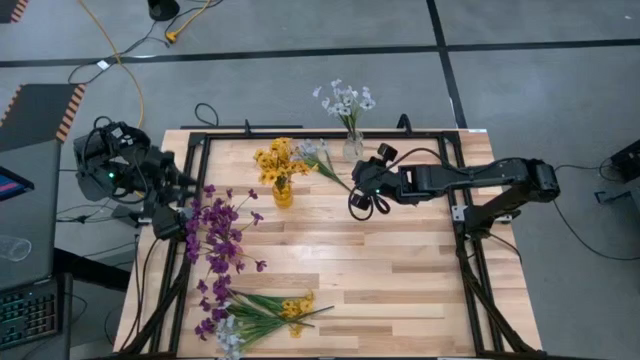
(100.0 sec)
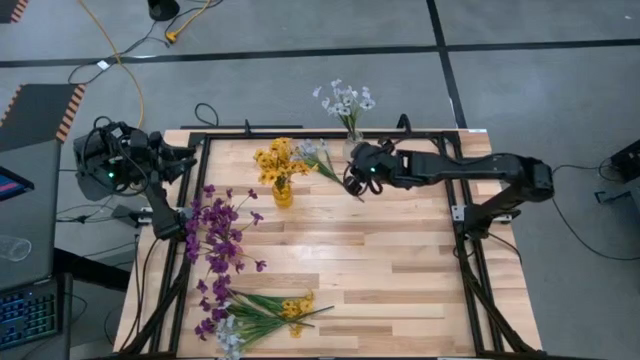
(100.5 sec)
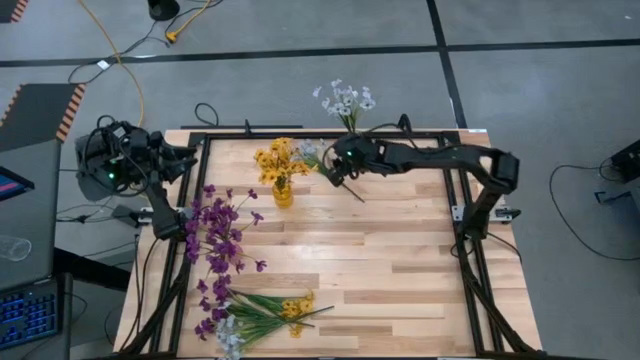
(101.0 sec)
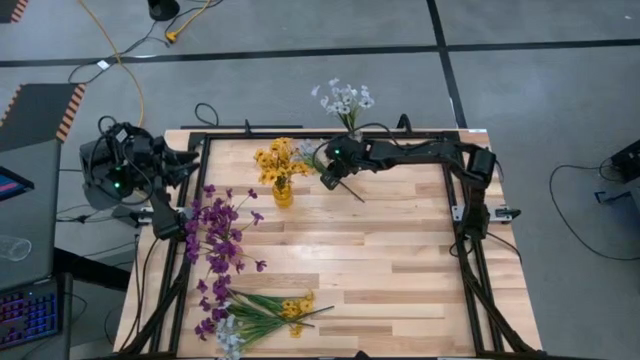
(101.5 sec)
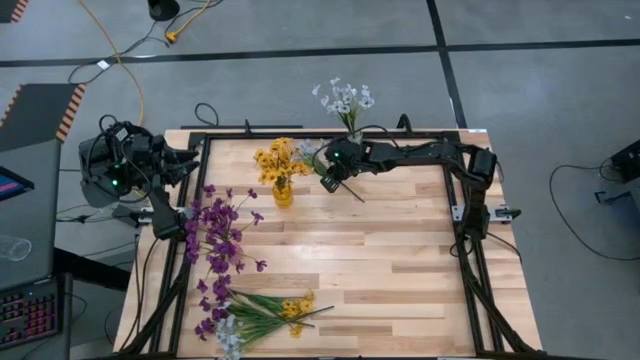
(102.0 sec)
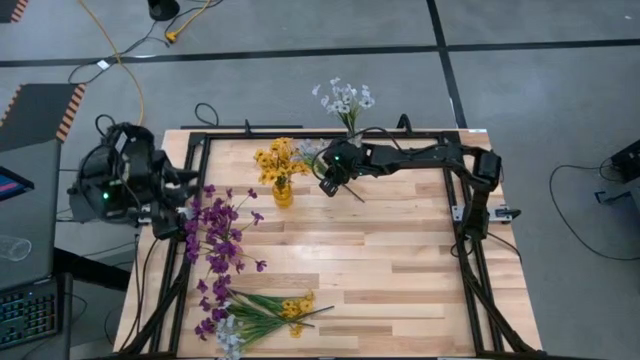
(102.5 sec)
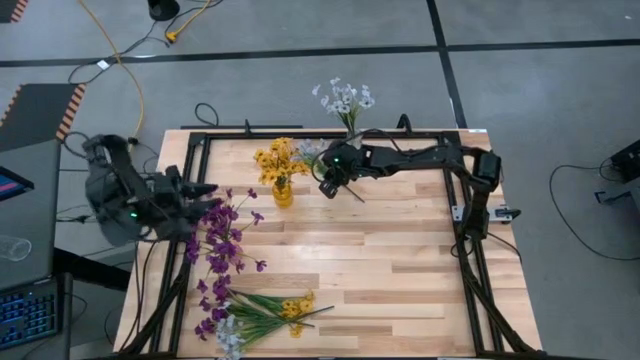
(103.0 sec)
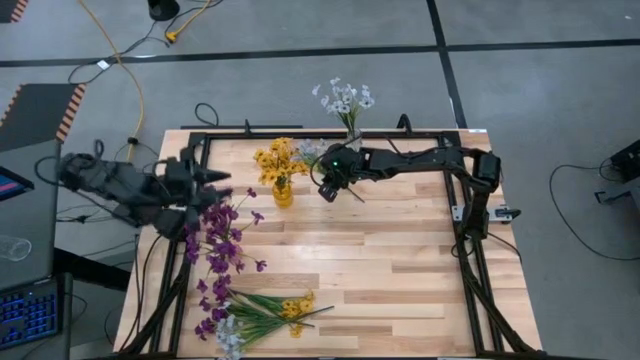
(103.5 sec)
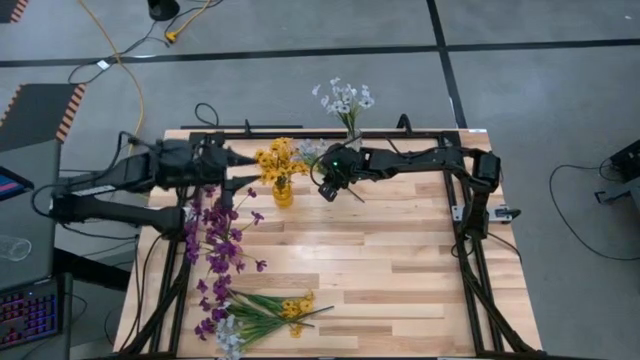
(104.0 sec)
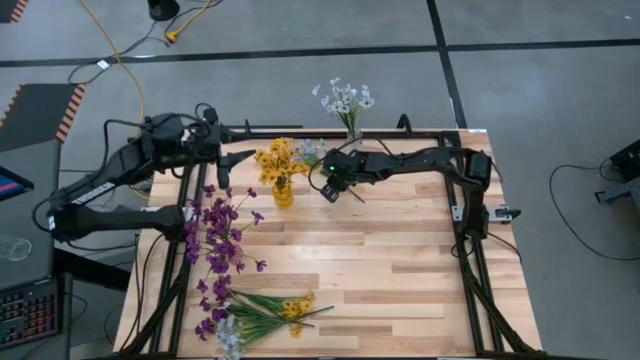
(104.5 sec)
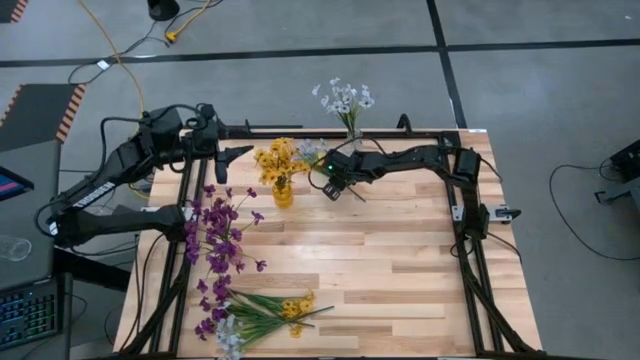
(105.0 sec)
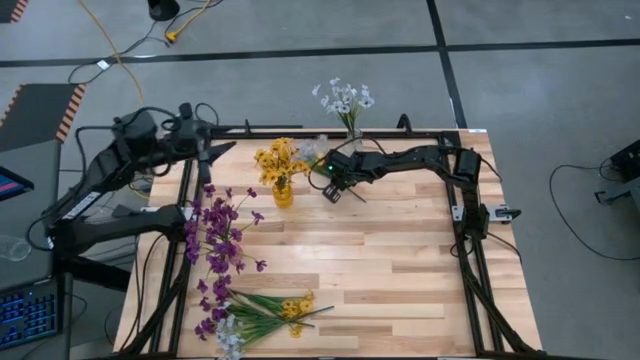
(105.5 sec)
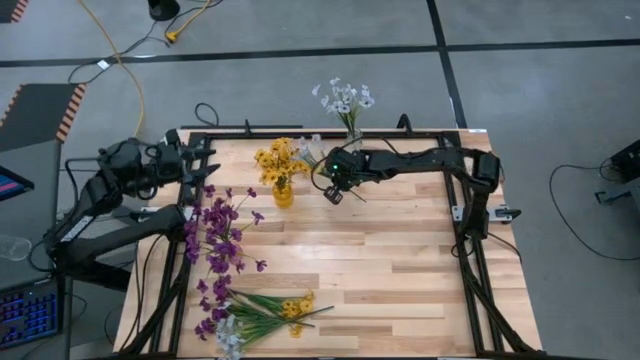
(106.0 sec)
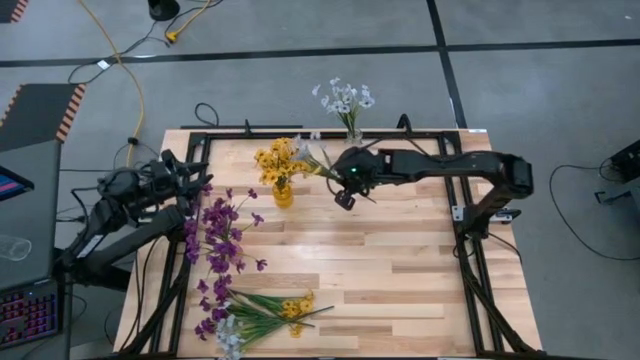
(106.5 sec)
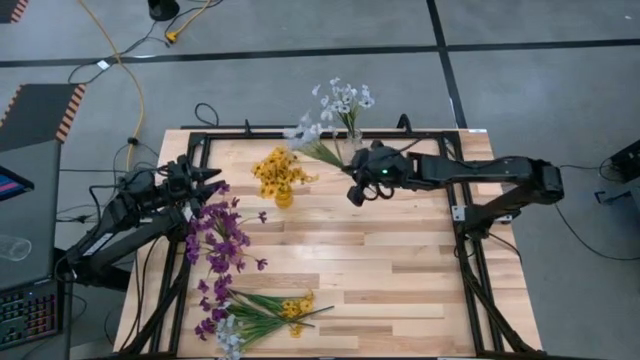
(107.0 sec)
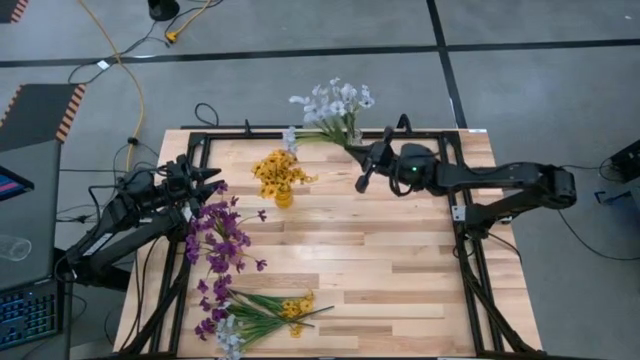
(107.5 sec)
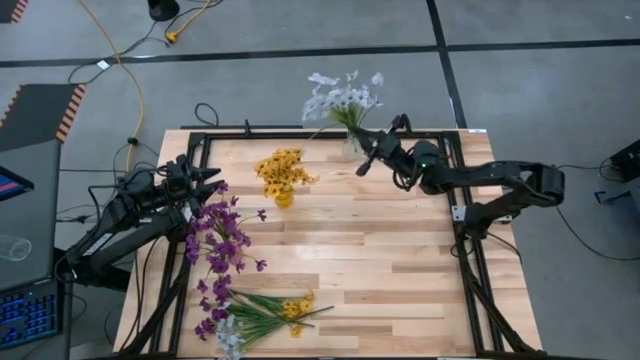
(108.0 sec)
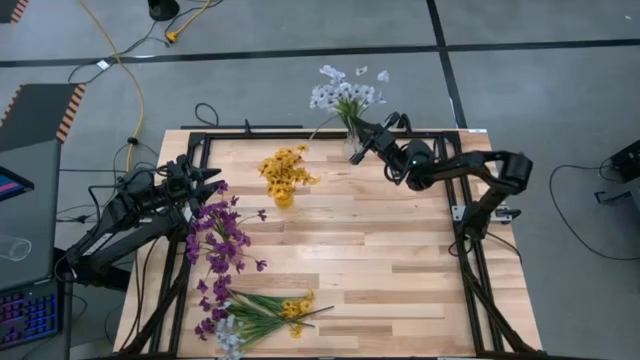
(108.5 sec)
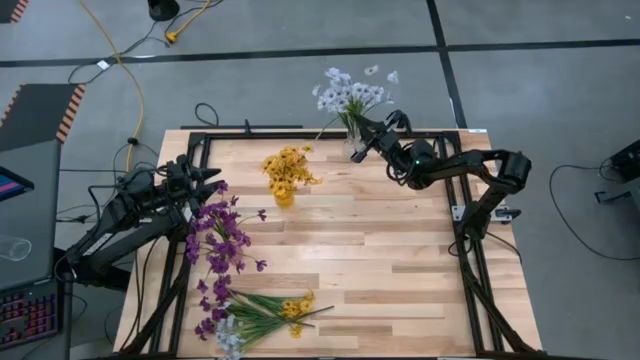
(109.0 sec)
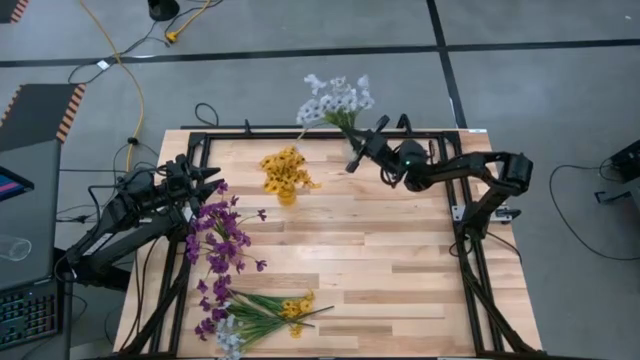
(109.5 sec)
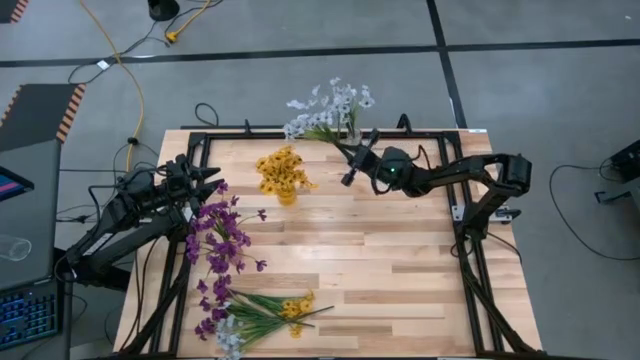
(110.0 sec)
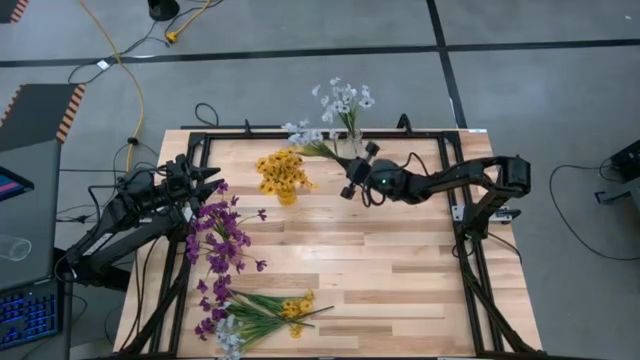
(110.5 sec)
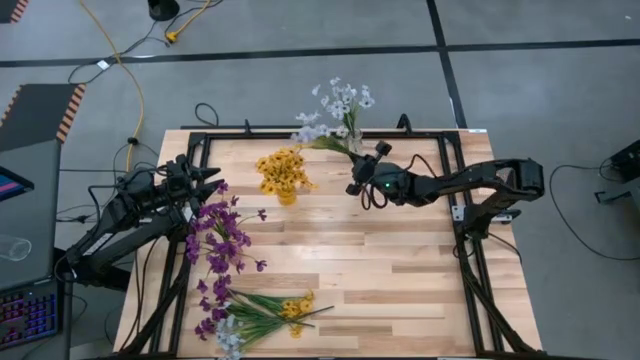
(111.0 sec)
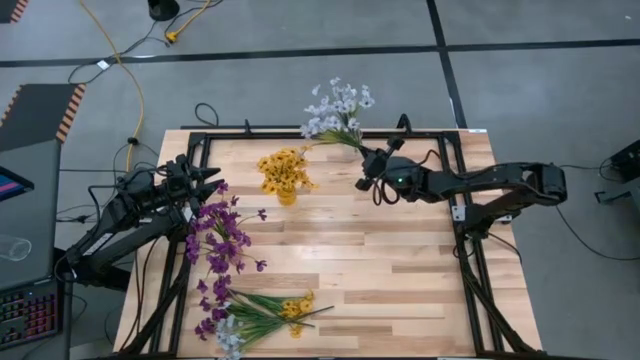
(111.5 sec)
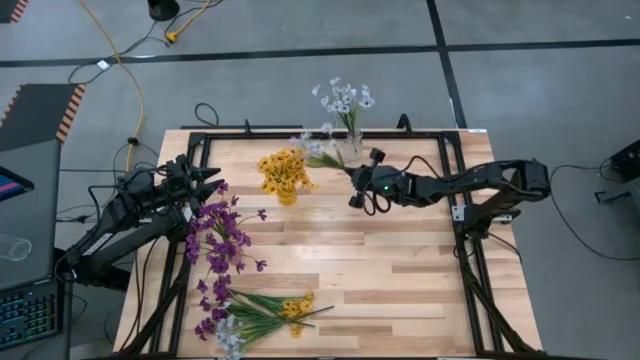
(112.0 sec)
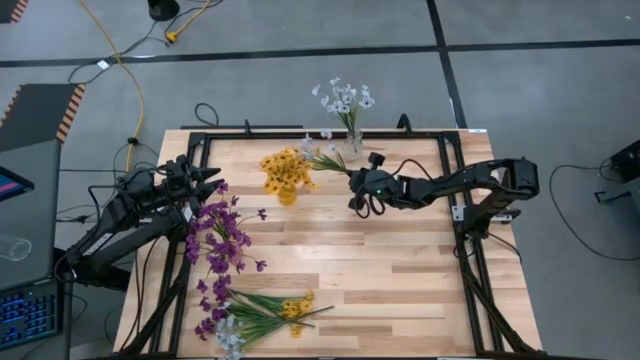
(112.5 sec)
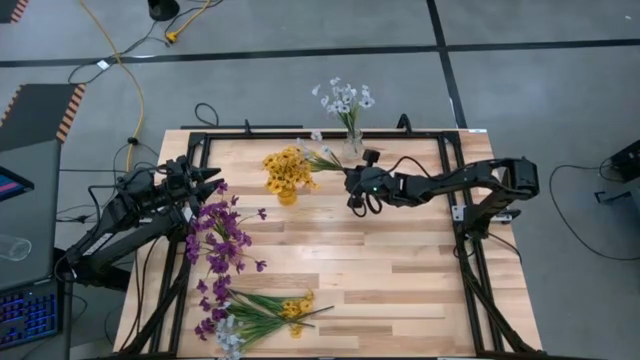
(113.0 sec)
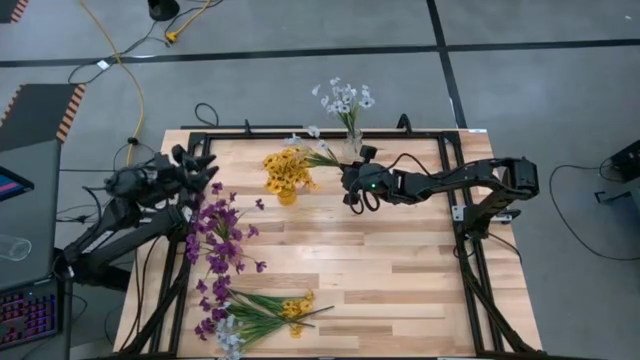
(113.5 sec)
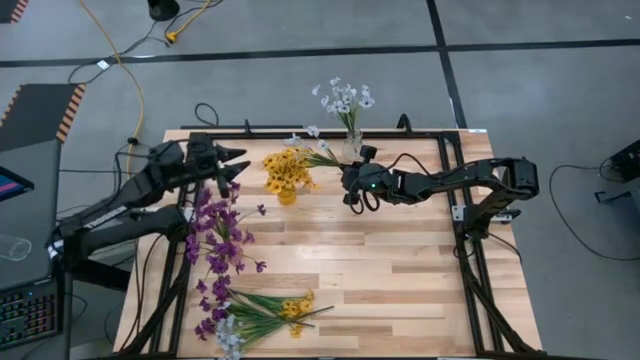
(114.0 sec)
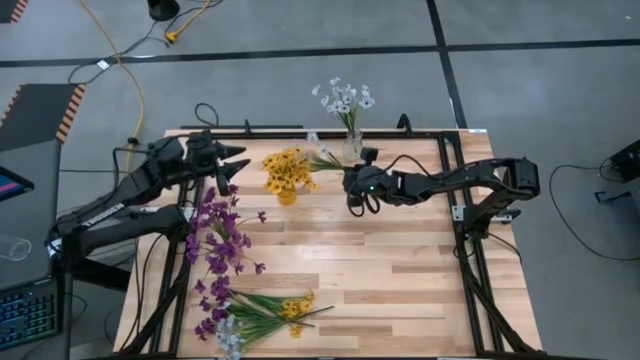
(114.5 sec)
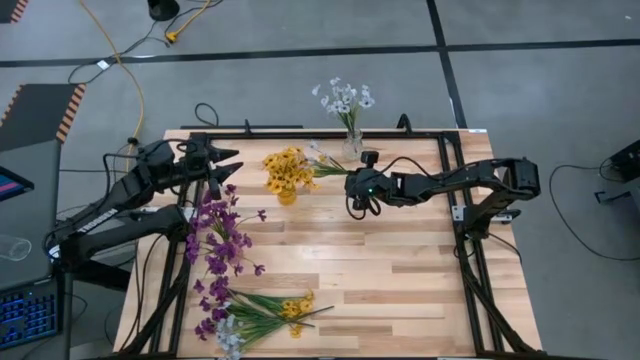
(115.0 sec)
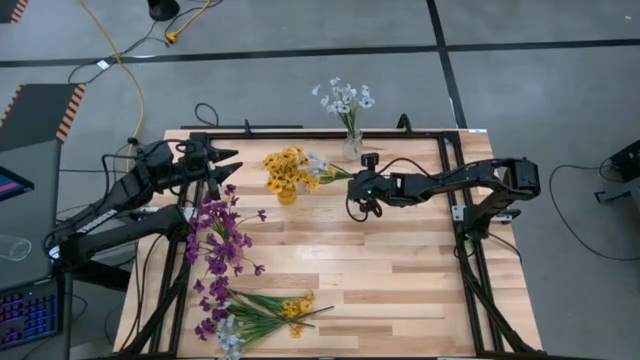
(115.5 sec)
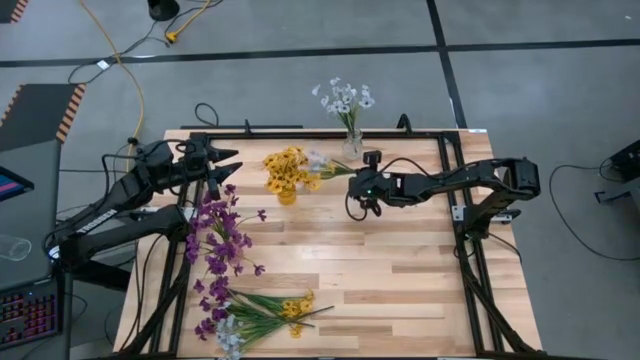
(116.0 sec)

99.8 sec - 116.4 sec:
Task: Sort flowers into vase by color
Put the top white flowers into the transparent vase

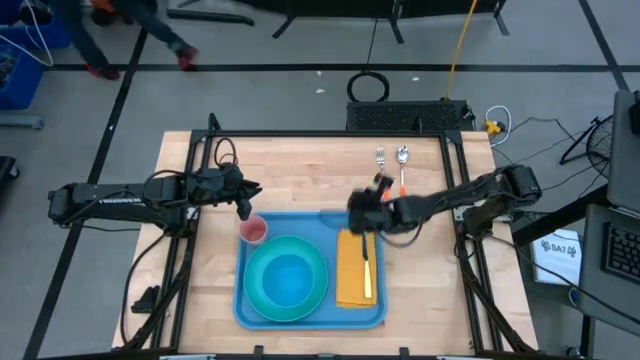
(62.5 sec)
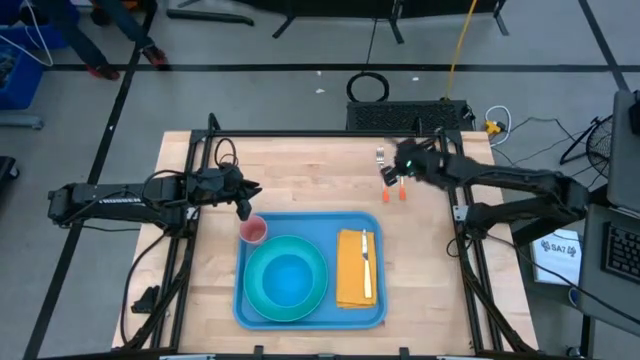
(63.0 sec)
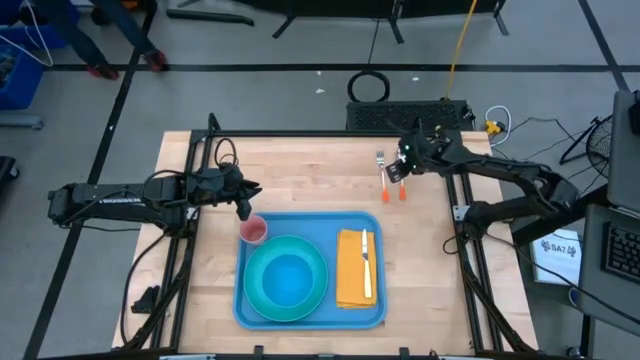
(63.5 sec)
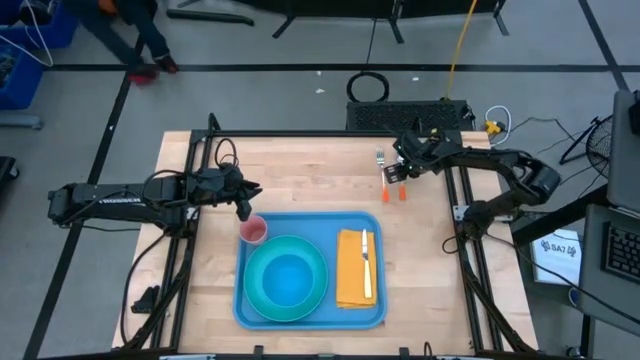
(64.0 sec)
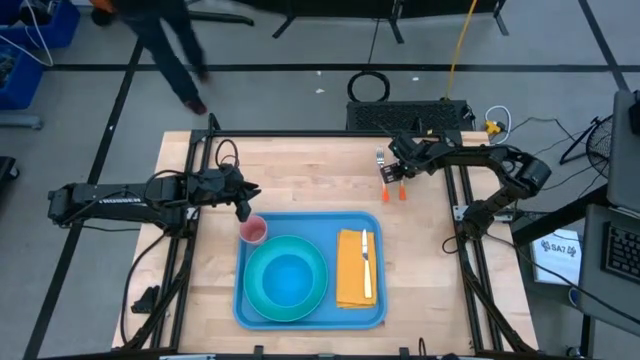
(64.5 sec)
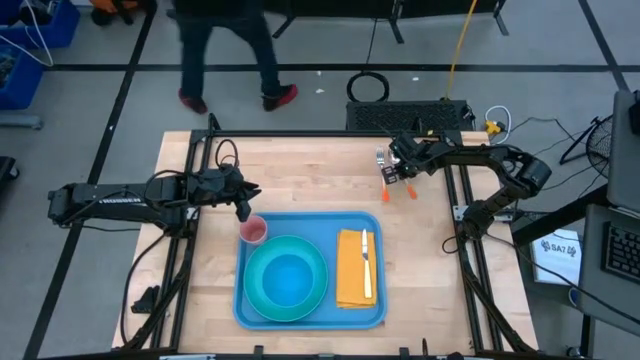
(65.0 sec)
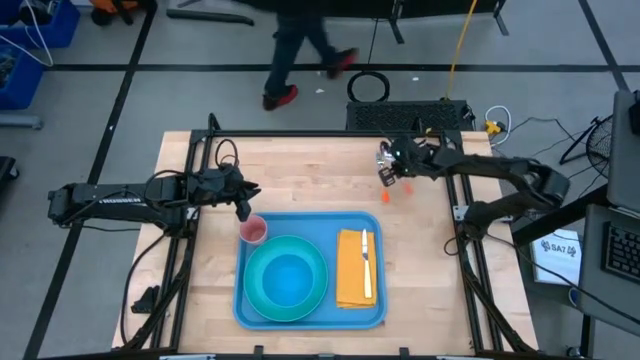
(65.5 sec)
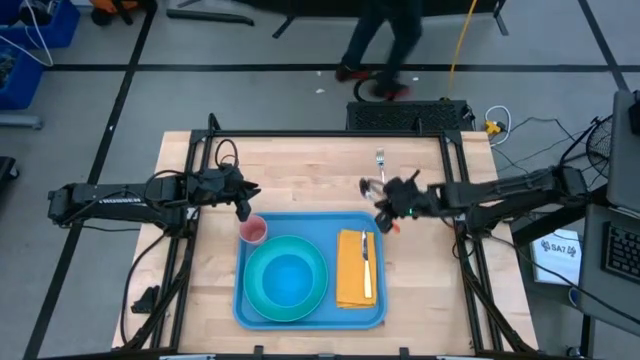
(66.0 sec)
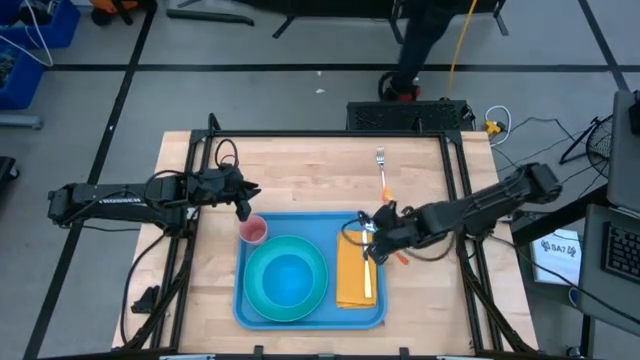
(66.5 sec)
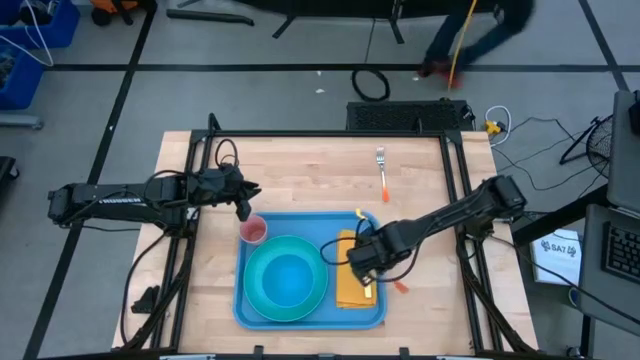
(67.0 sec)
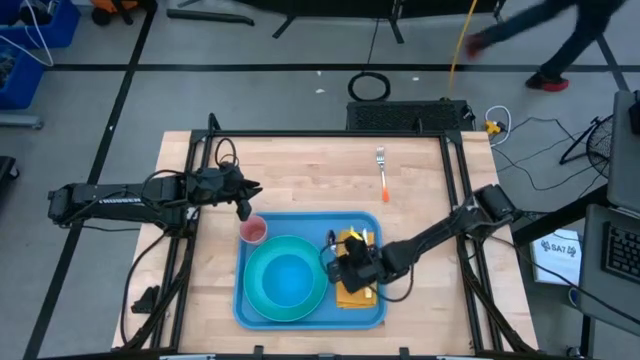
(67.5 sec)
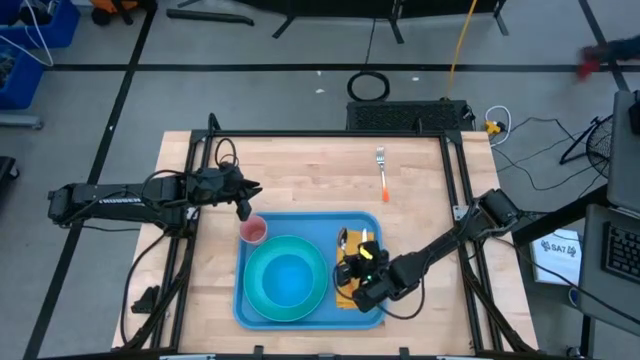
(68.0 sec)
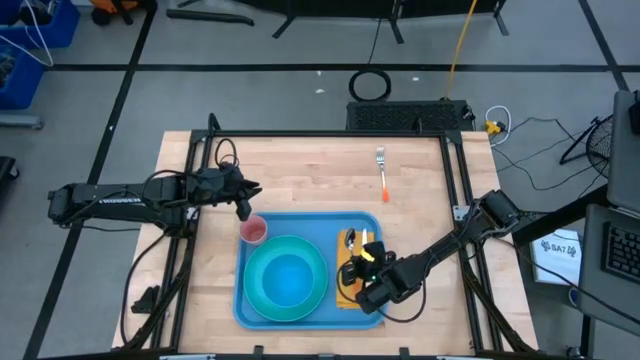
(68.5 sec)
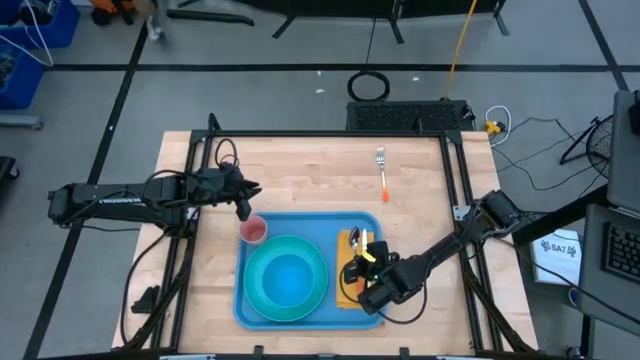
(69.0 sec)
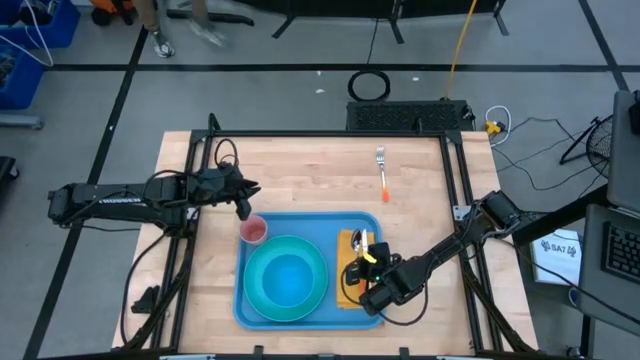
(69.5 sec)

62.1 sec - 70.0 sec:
Task: Set up tray
Put the orange spoon on the yellow napkin to the left of the yellow knife
